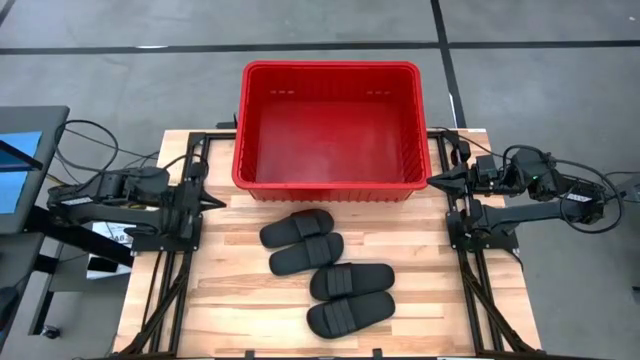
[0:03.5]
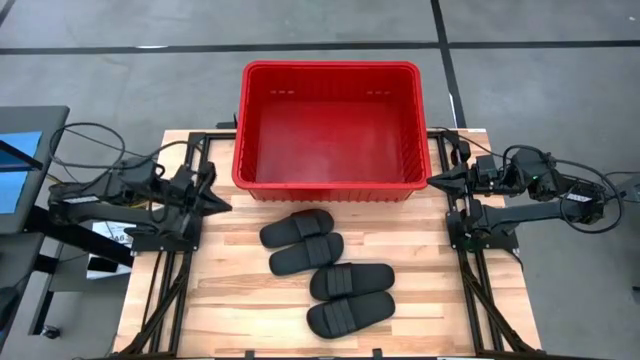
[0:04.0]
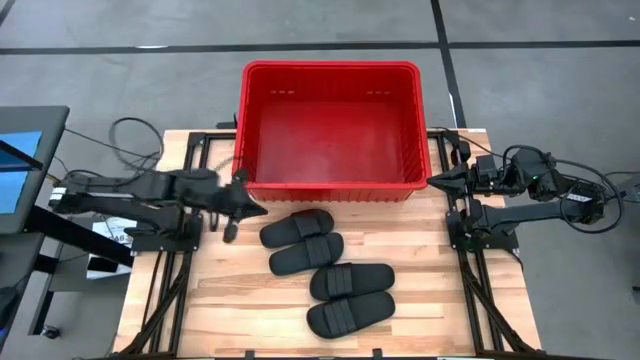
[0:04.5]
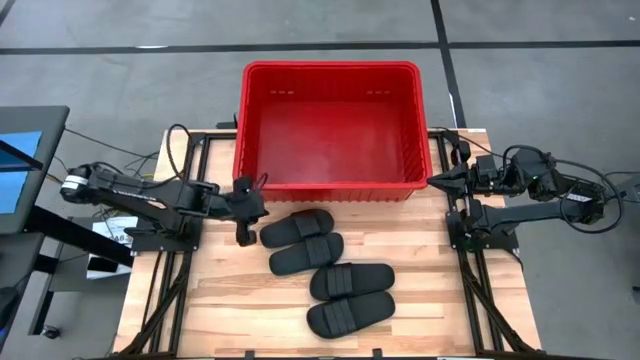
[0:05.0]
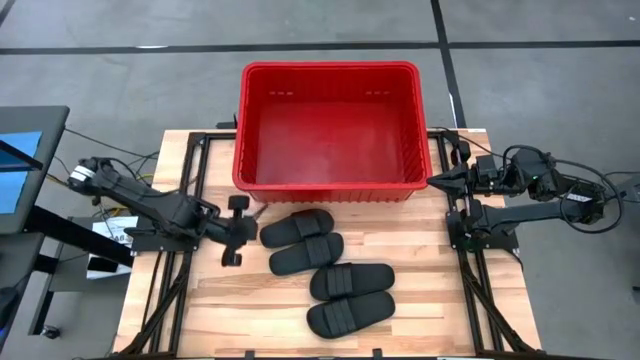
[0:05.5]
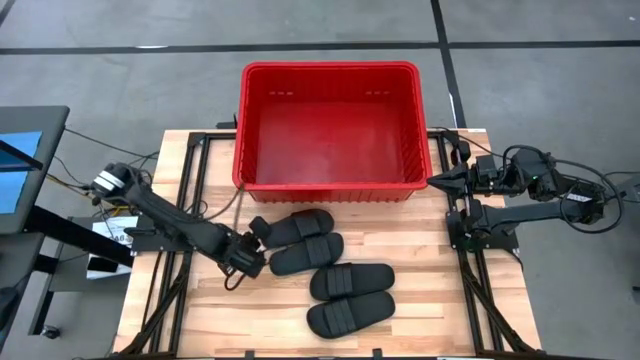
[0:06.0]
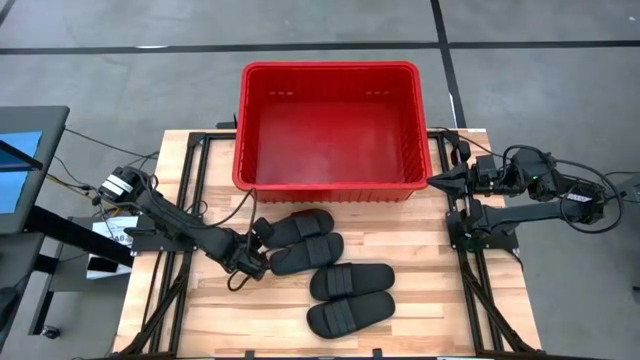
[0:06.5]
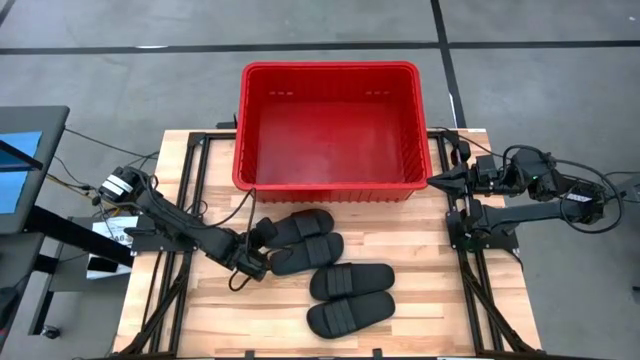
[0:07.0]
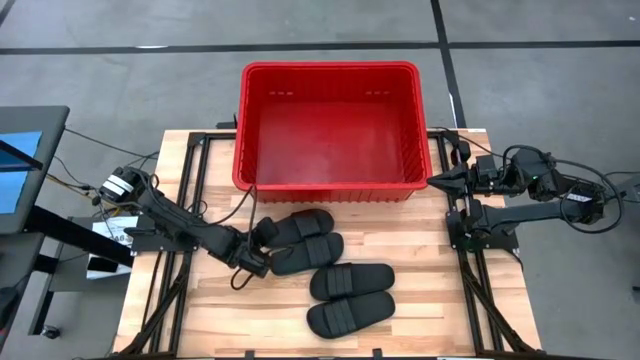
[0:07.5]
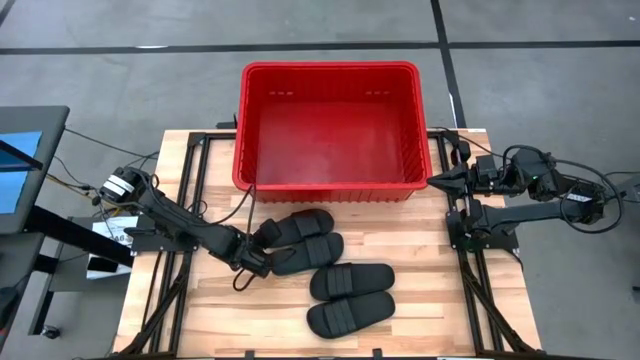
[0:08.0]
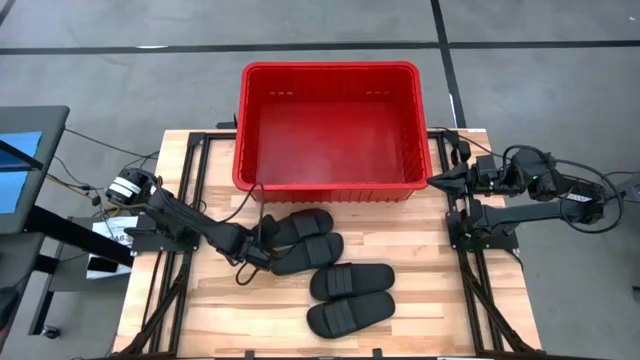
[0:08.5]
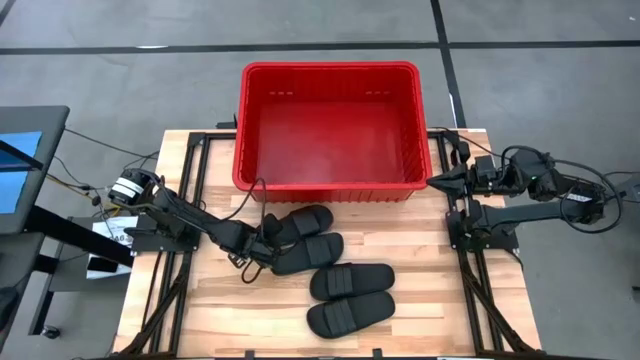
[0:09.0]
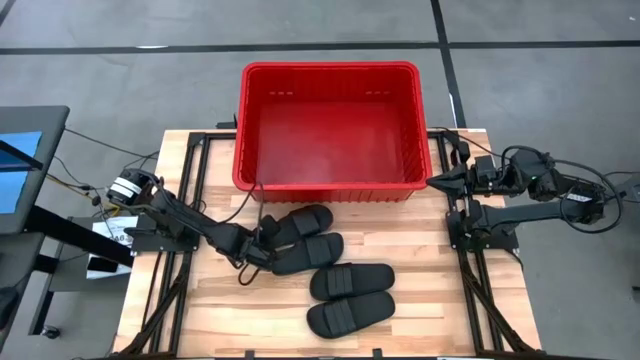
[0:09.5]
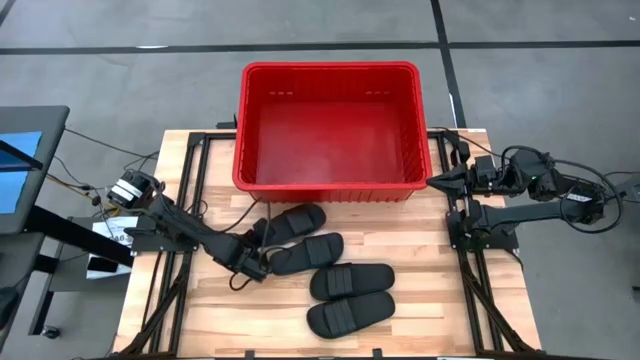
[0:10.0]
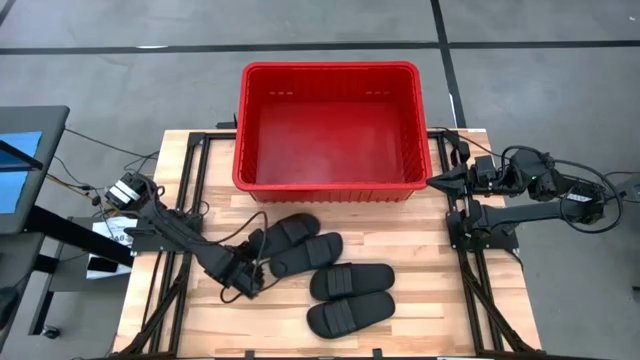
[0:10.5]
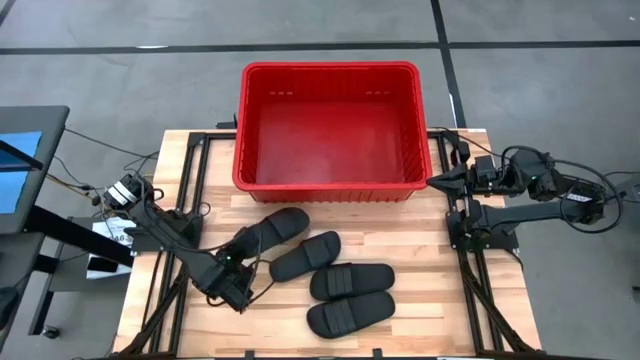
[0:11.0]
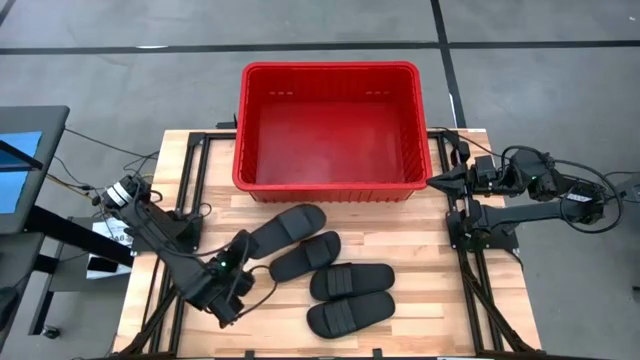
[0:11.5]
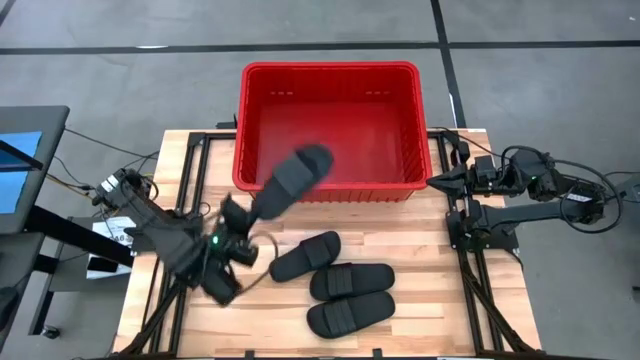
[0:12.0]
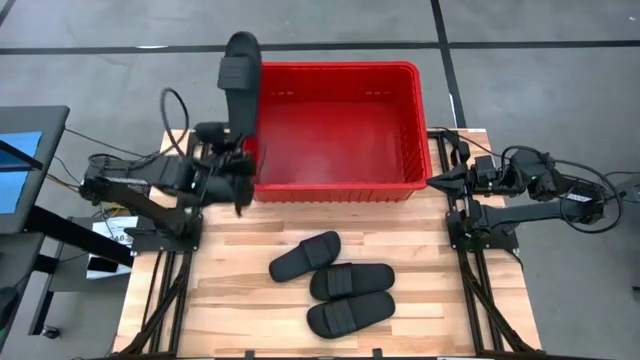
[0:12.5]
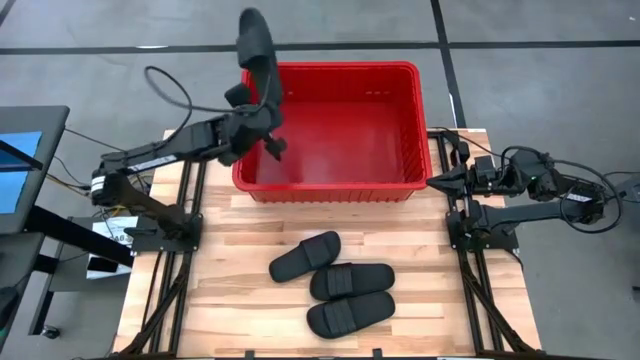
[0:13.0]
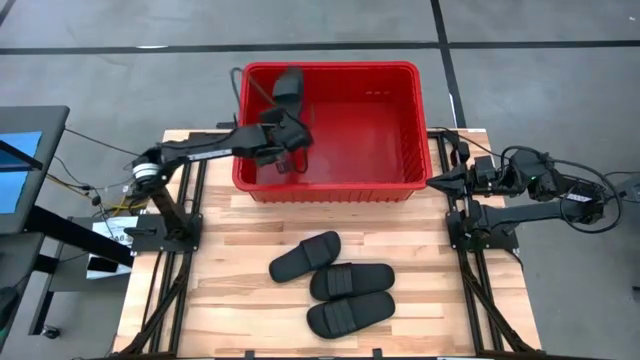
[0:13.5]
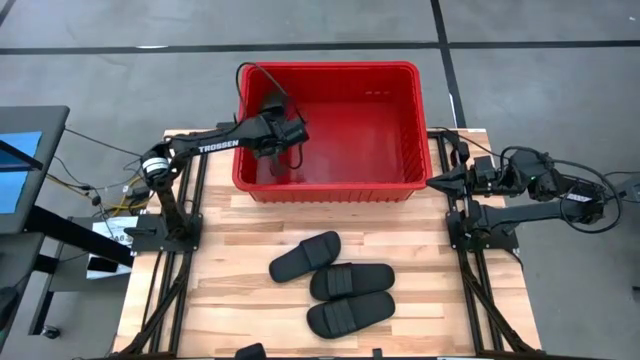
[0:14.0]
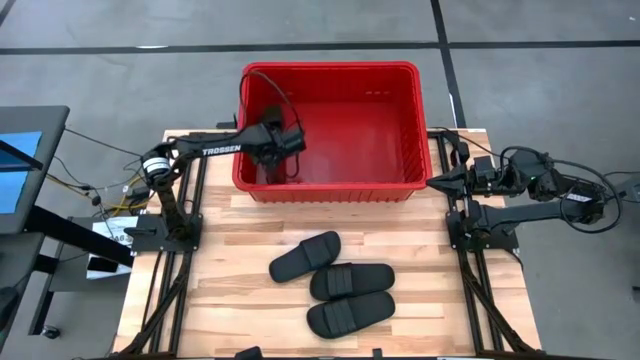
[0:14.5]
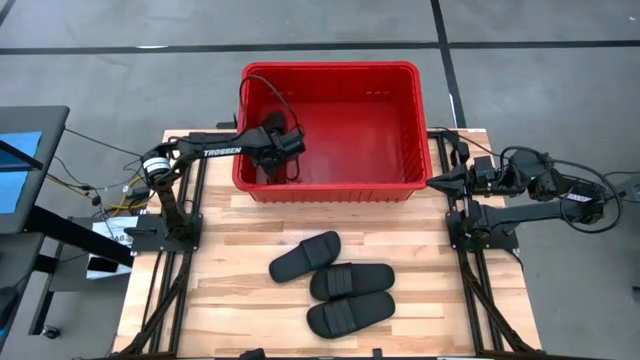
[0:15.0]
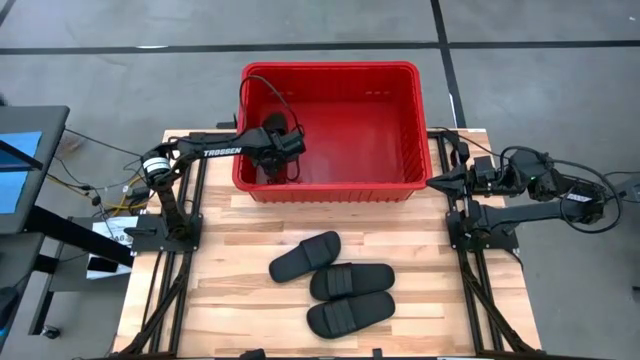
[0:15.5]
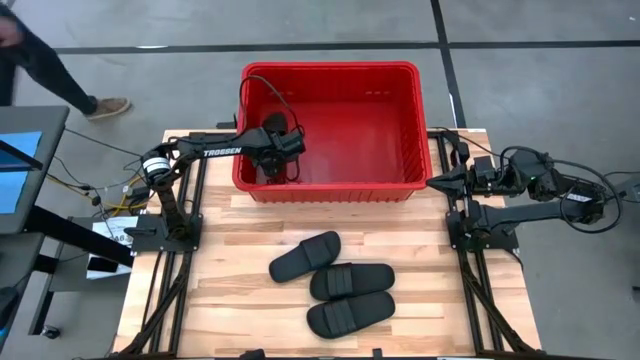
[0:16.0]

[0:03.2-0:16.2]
Task: Pick and place slides into bin
Put the black slipper into the red bin

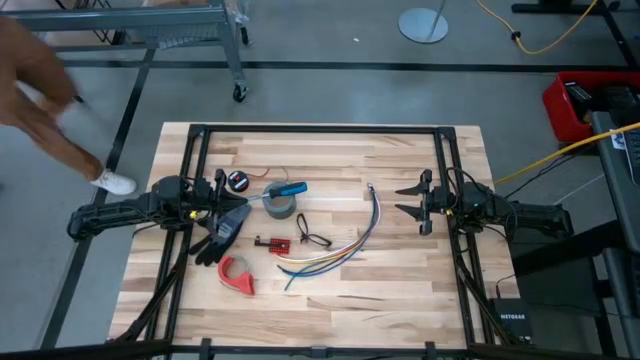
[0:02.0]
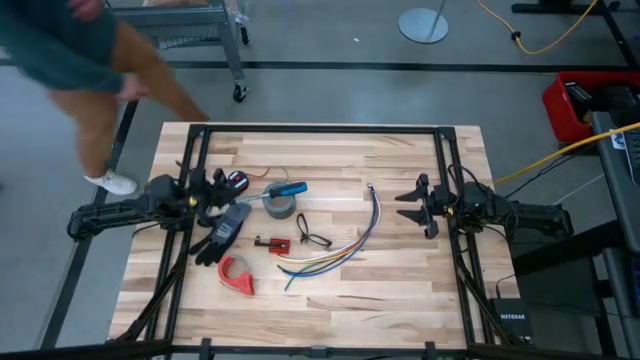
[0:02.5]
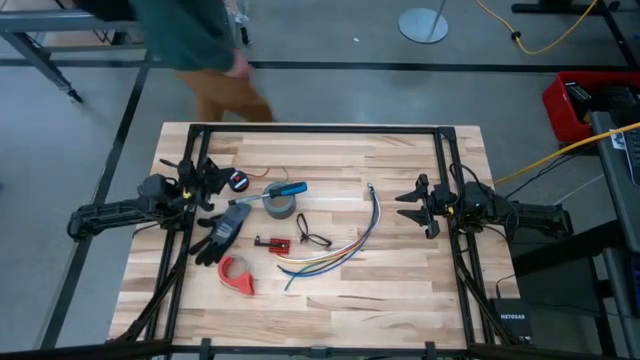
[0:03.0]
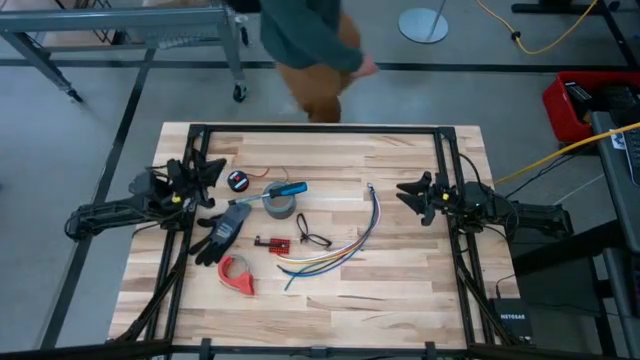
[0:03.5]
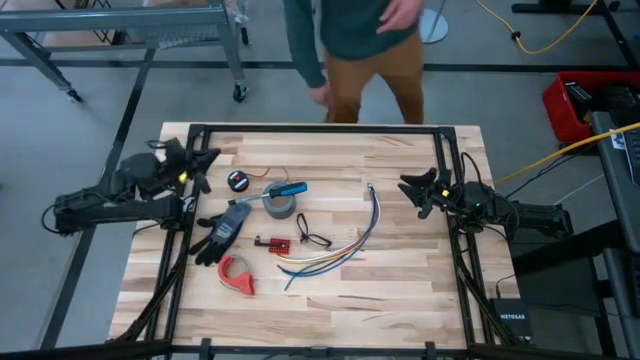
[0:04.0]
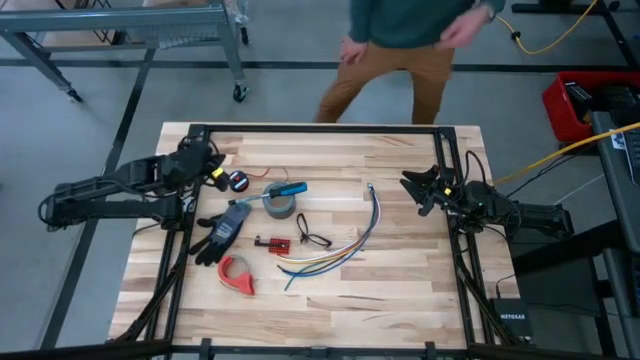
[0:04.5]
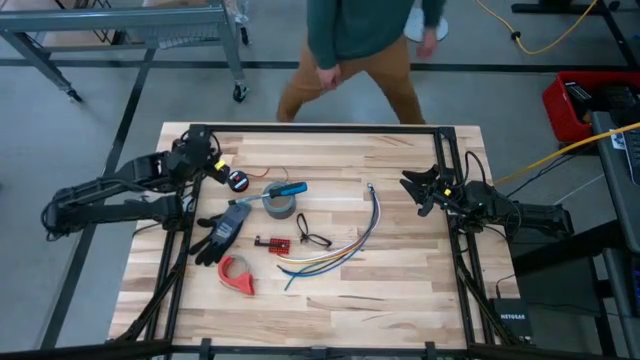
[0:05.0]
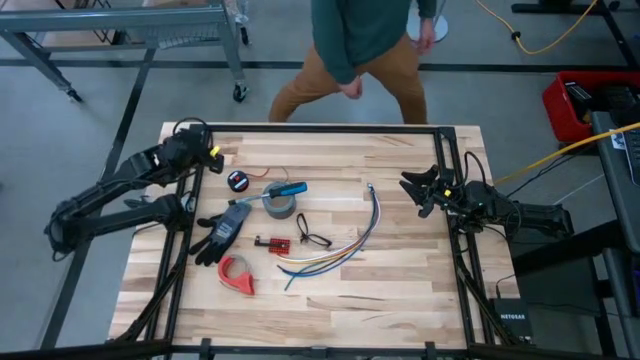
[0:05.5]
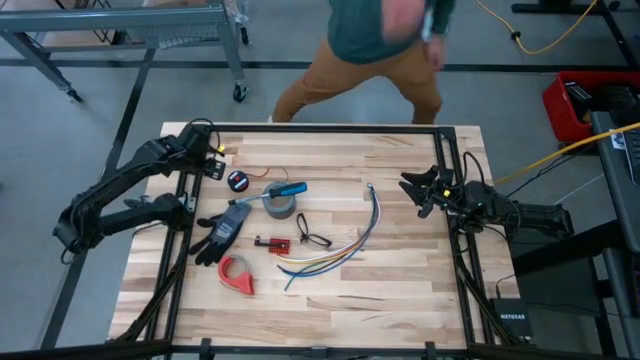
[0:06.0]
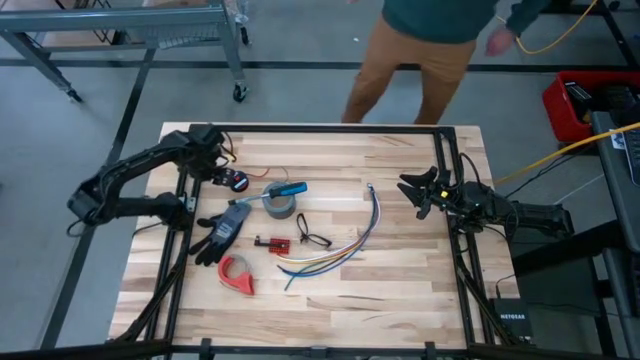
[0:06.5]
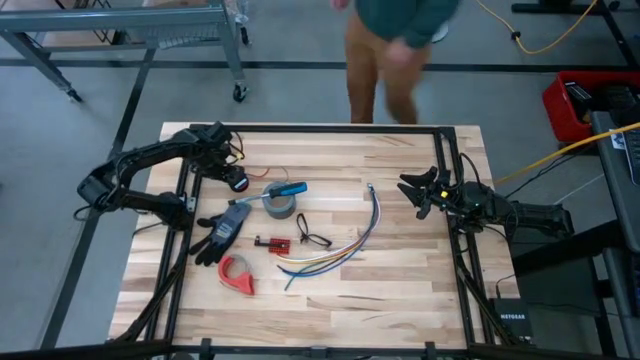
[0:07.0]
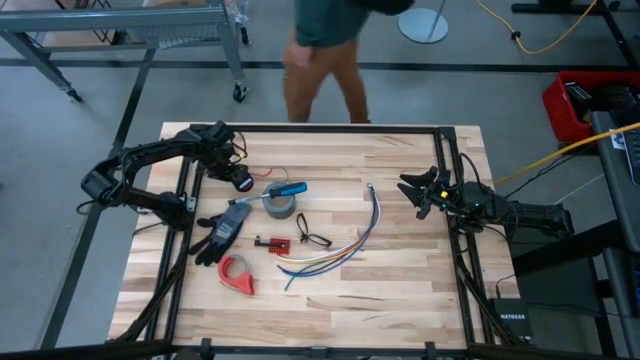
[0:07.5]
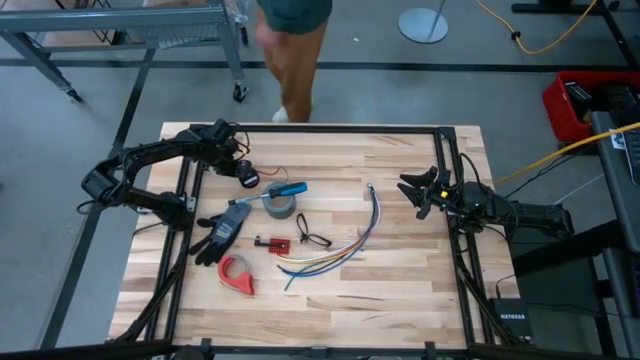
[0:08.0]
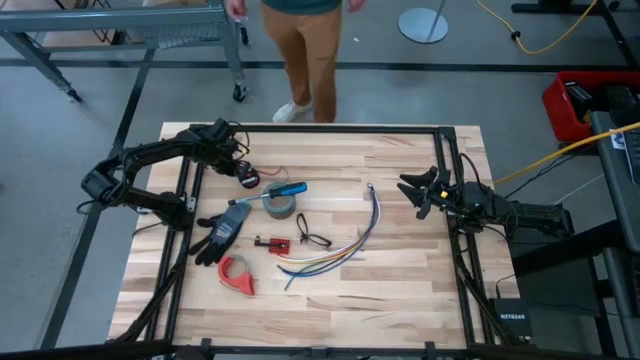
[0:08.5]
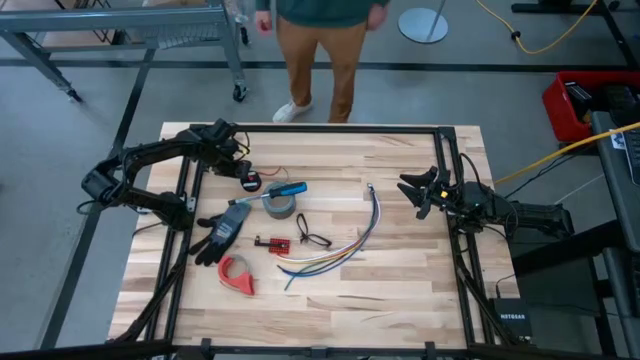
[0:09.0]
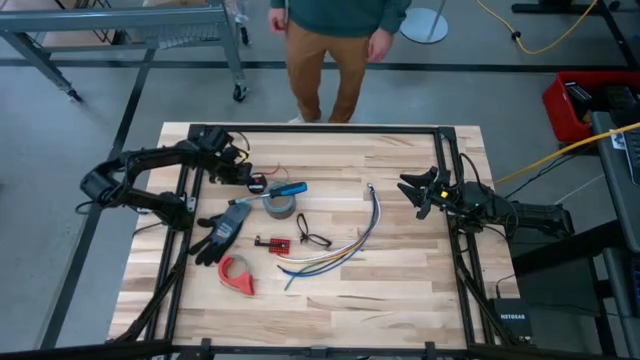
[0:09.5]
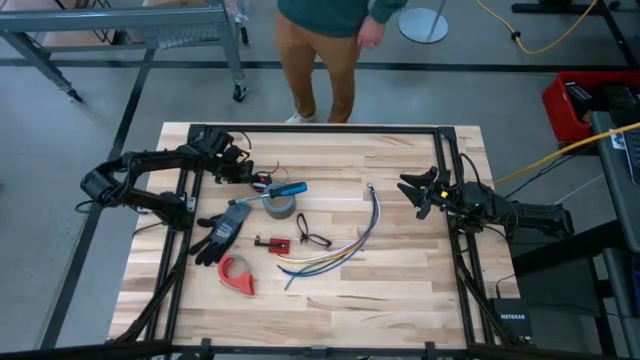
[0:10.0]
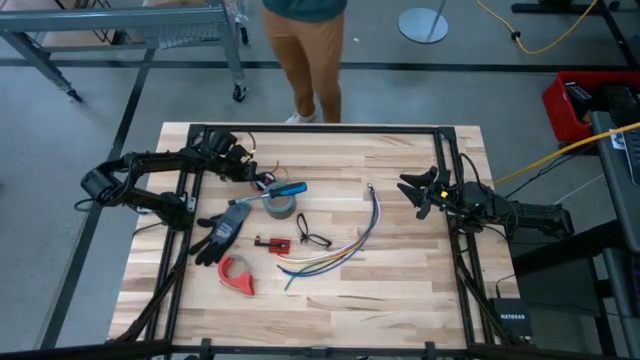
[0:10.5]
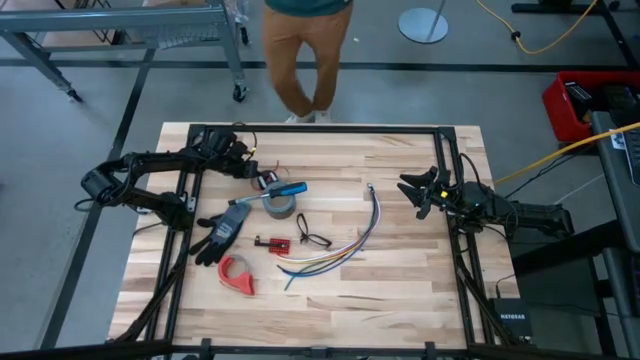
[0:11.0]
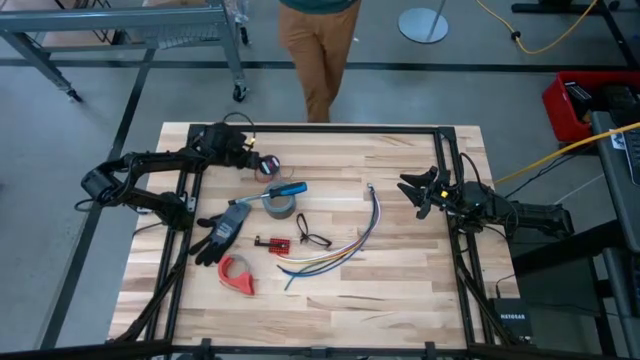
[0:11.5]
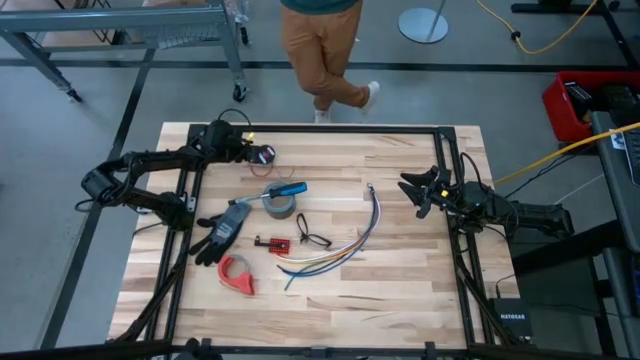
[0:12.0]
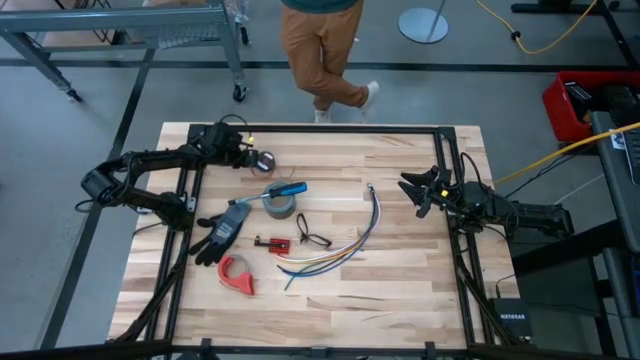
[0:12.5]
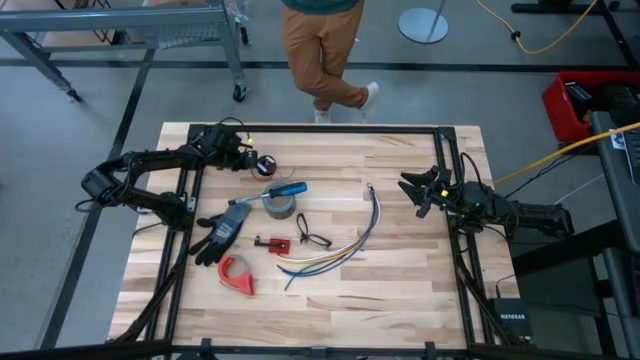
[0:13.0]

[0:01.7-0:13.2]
Task: Coil cords
Uncoil the red wire from the spool
